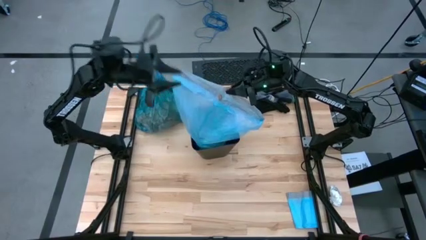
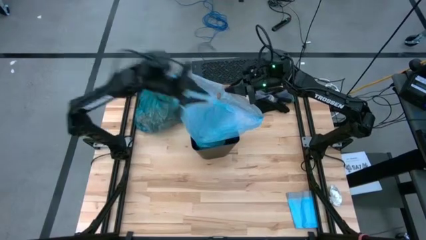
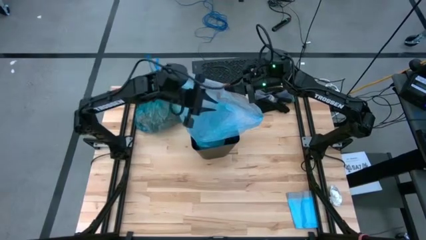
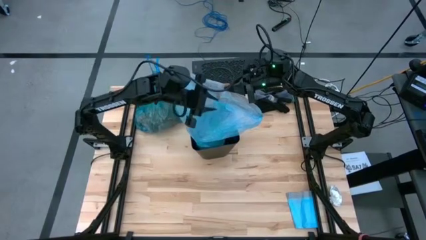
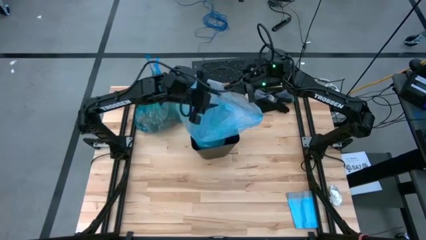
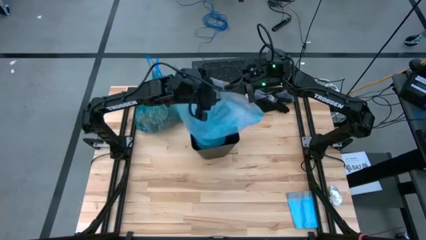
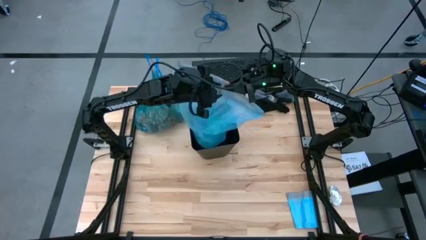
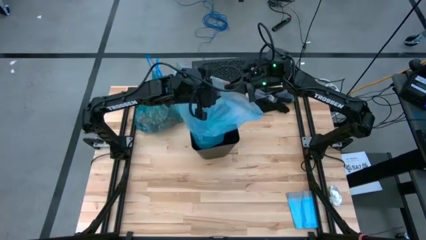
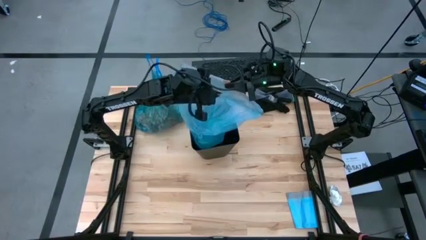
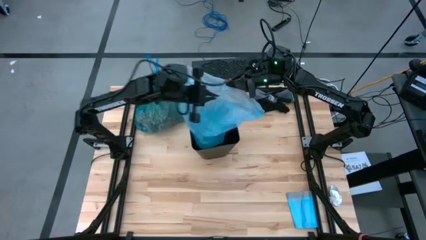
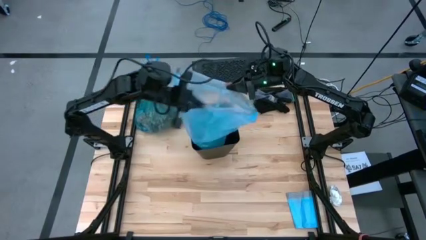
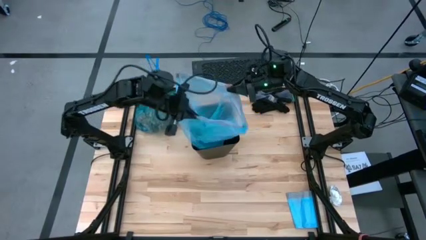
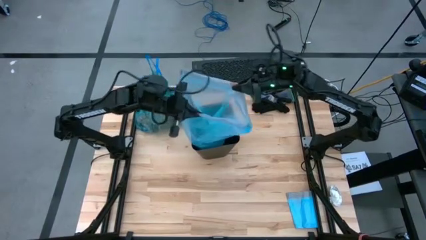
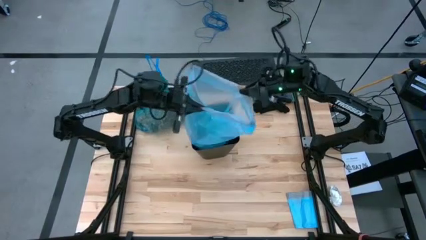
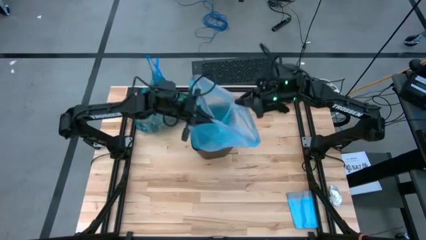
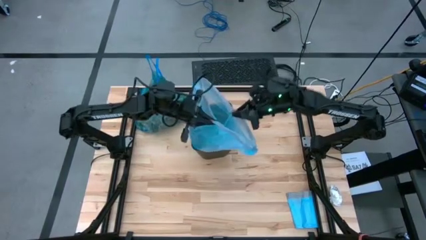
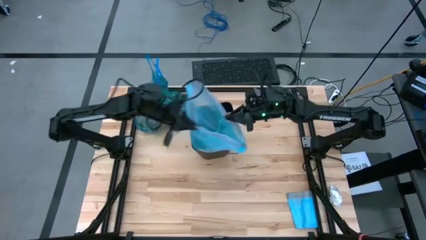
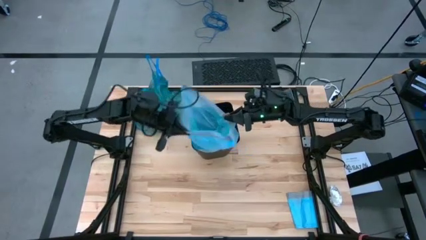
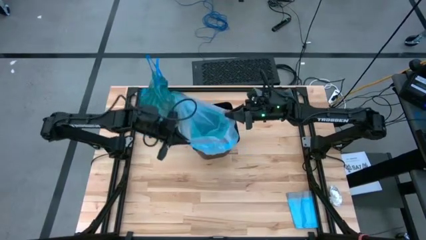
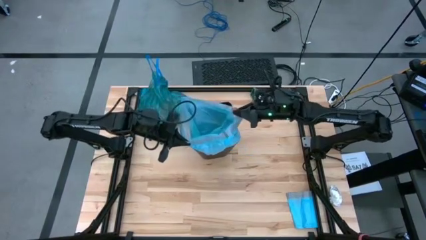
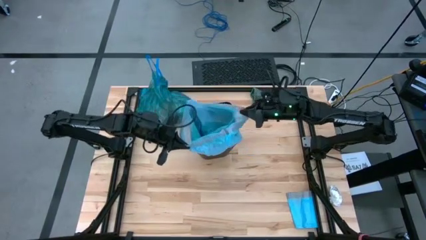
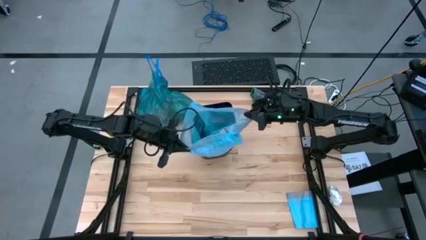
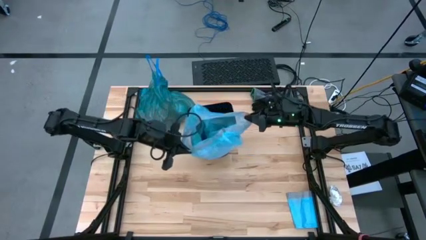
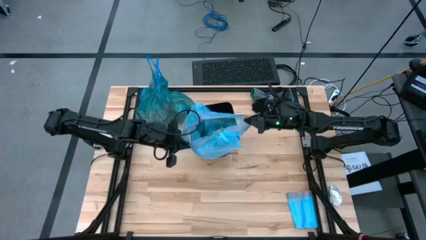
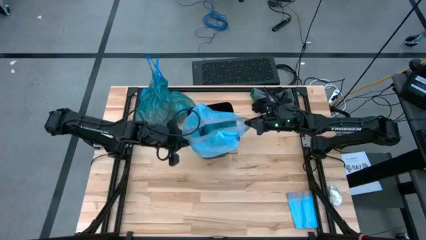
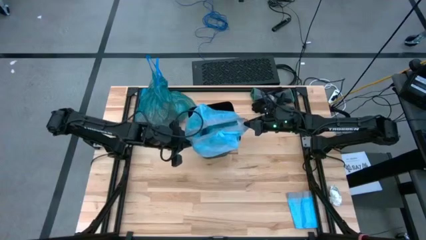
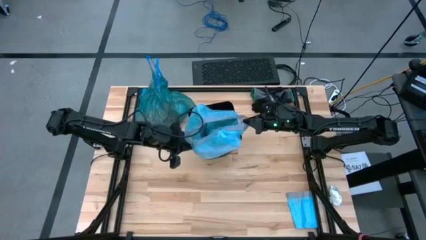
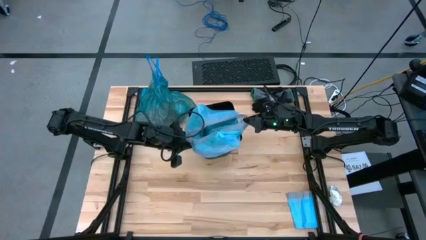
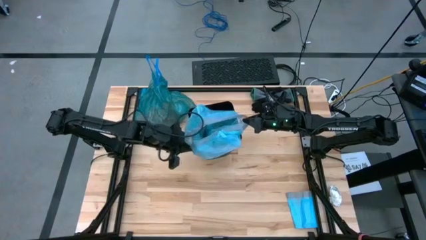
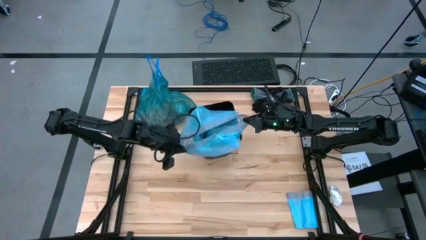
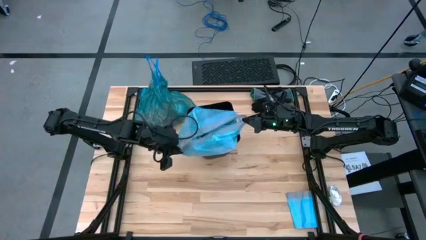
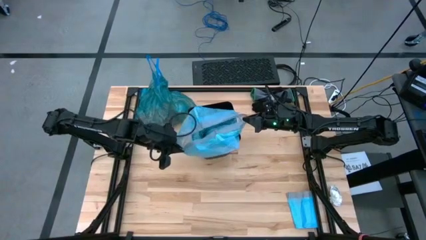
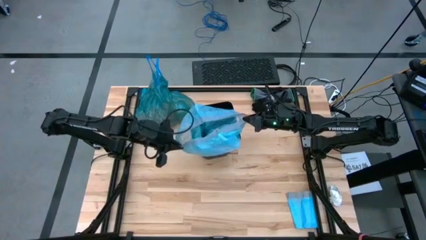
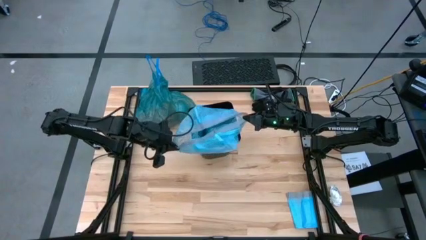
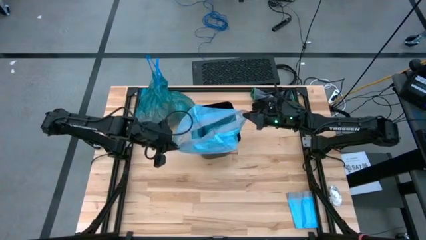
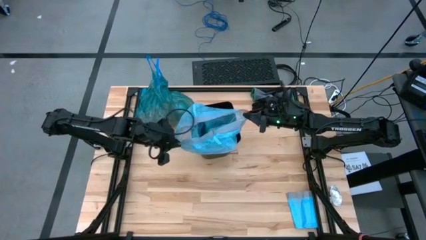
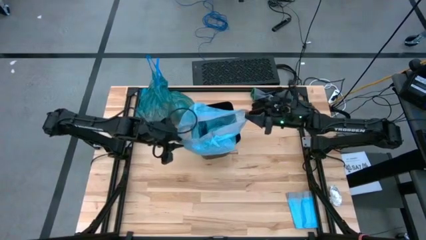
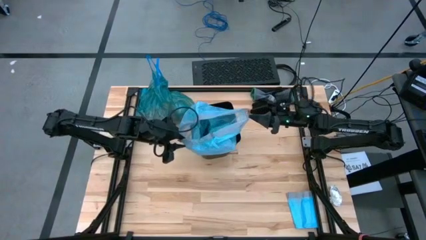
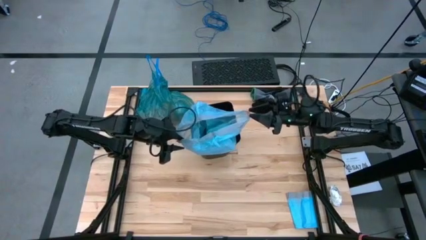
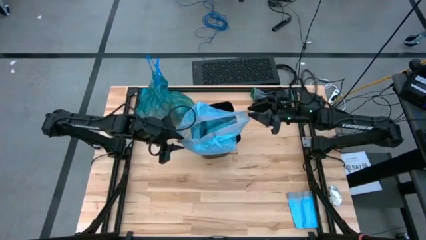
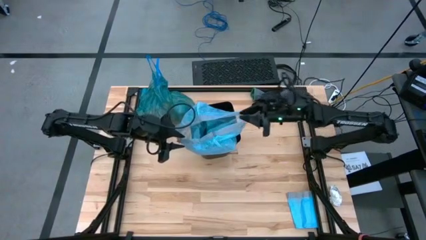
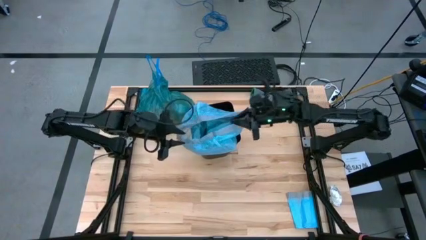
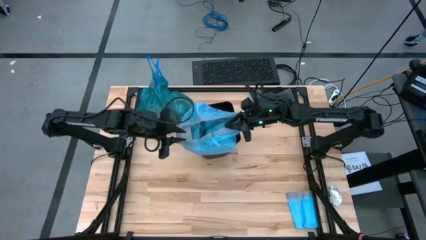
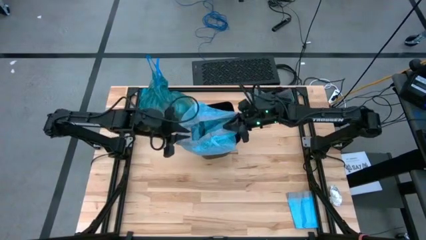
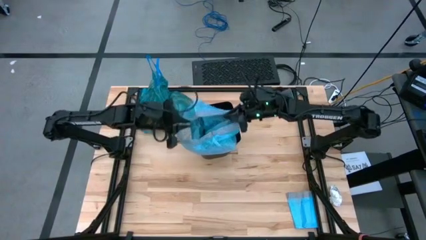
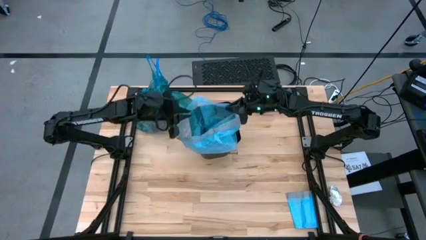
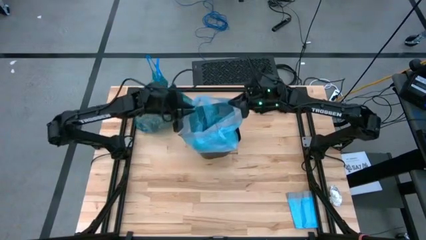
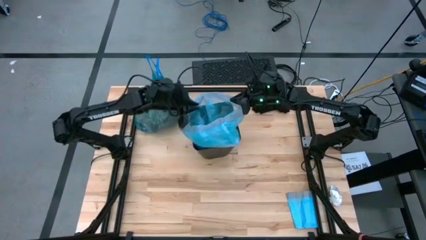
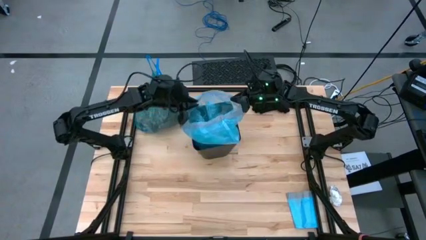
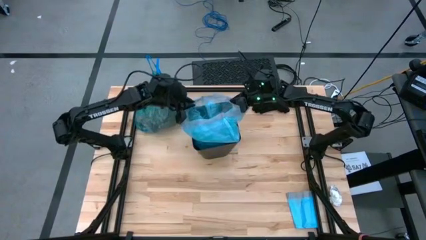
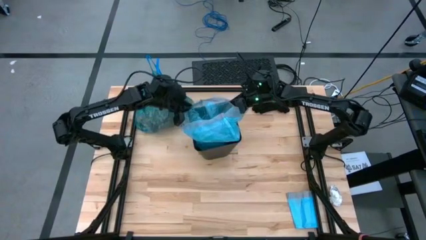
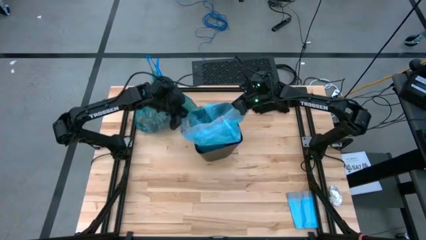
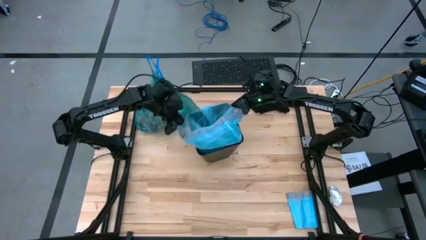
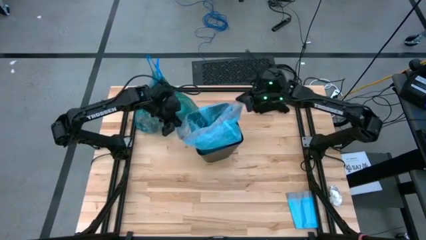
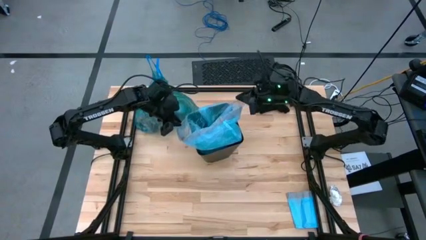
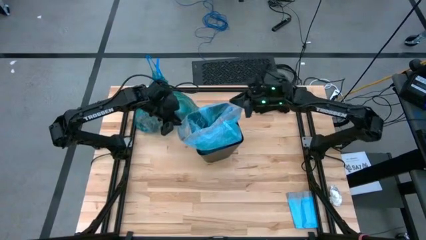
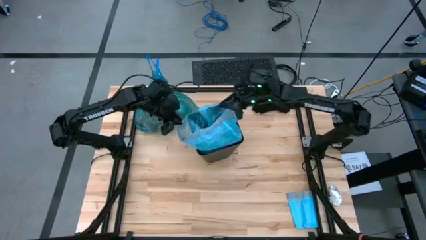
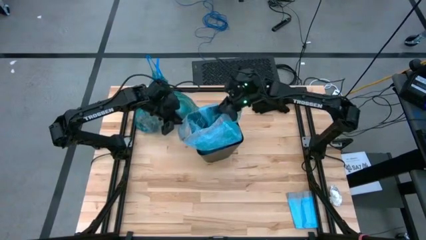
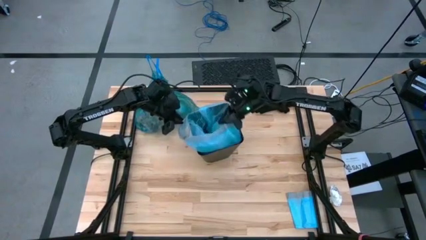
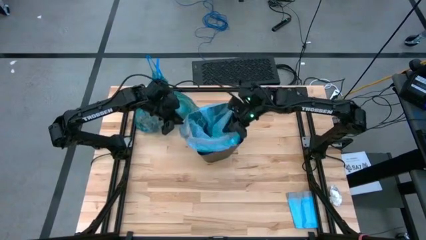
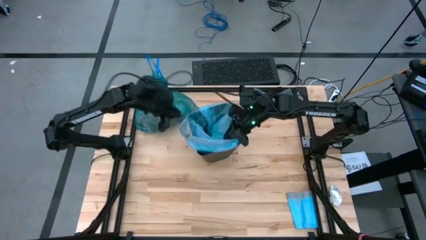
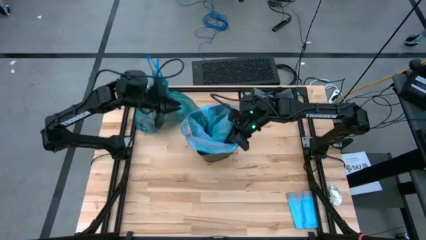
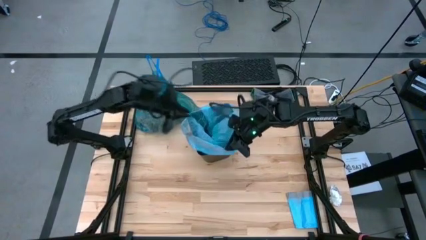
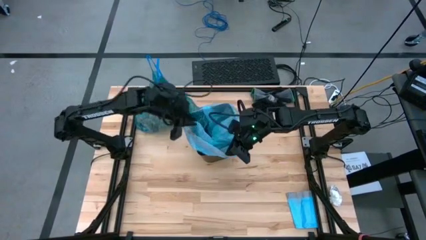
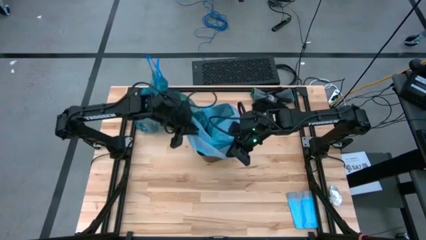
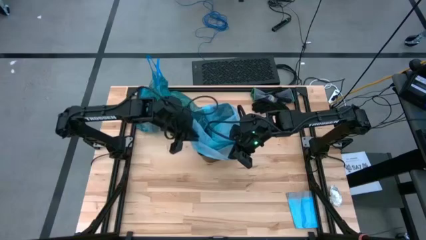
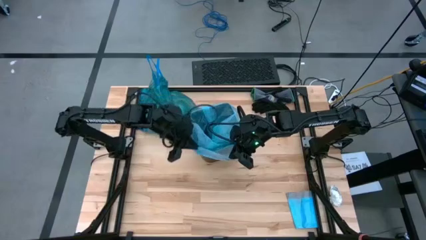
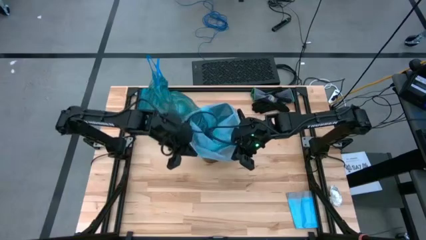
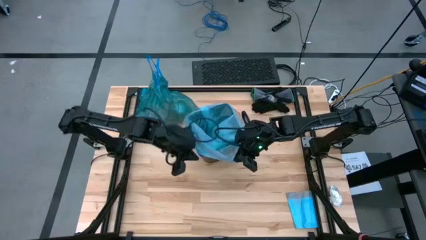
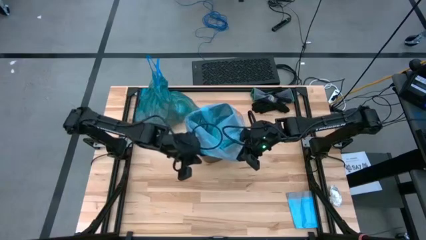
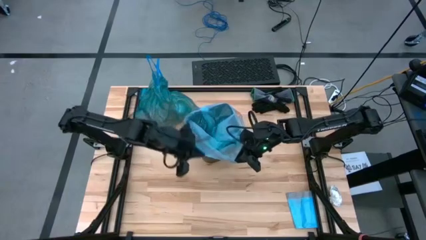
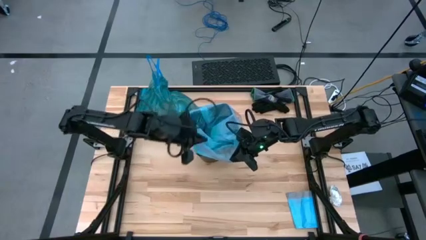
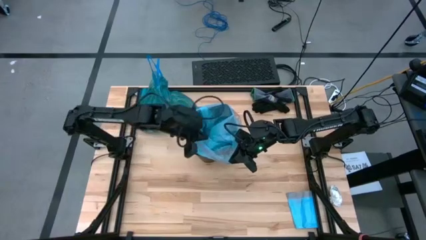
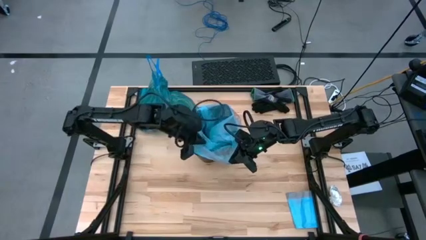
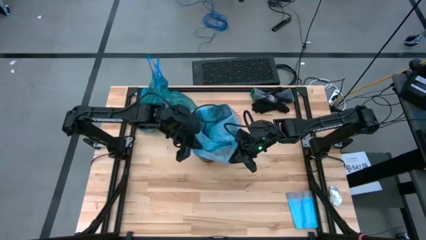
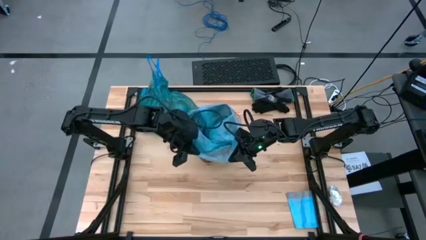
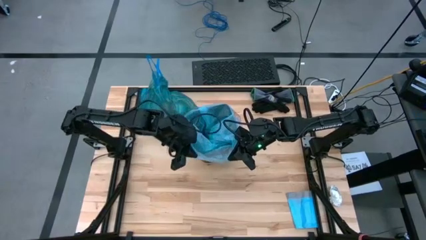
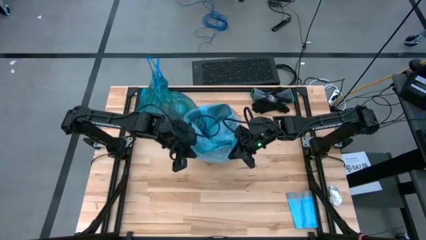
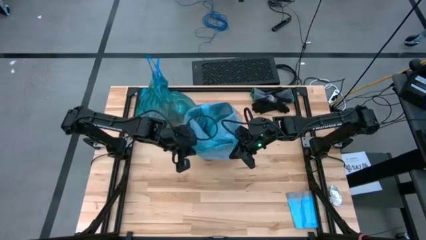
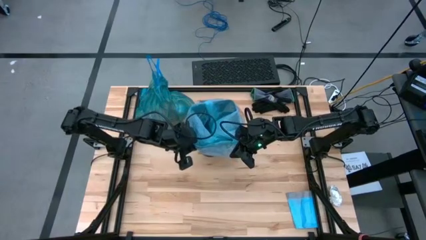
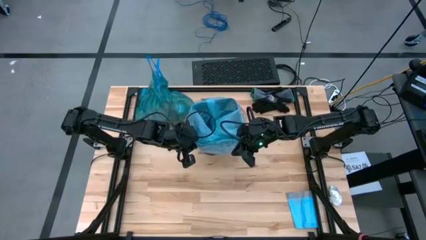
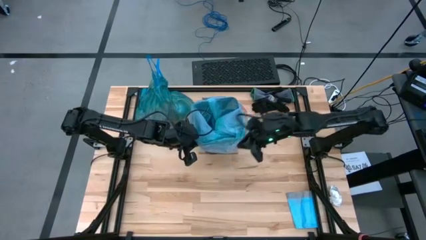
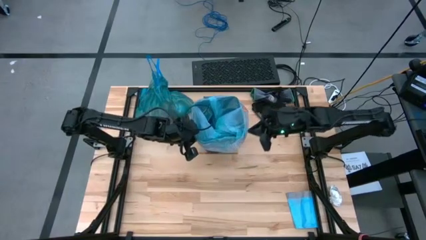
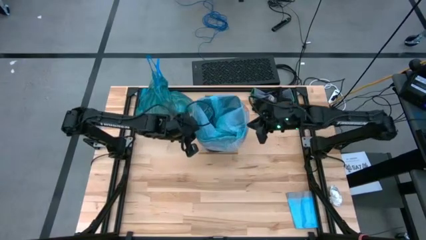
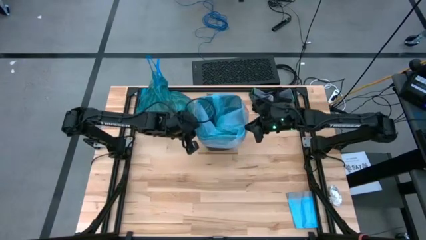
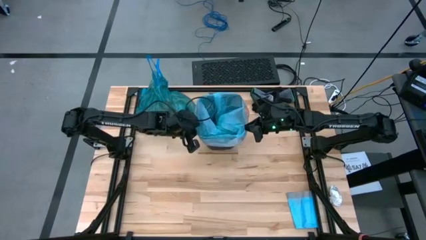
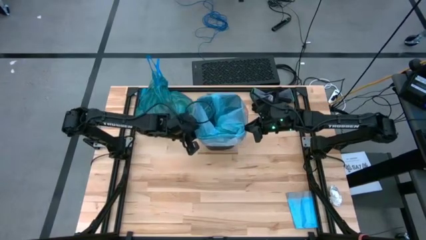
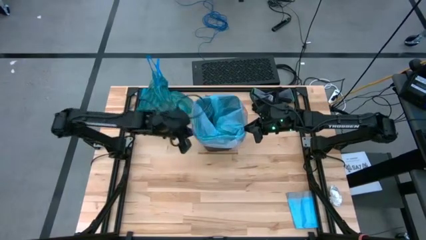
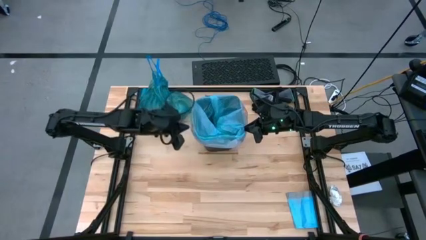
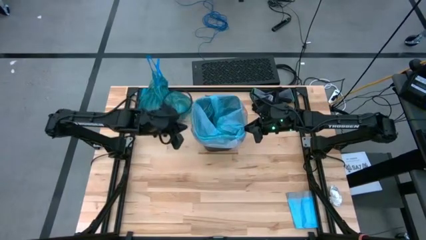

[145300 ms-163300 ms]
Task: place trash/remove bag and relplace
Put the new blue trash bag in the black trash bin
